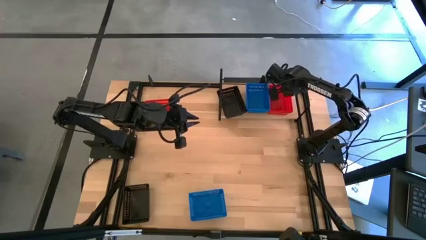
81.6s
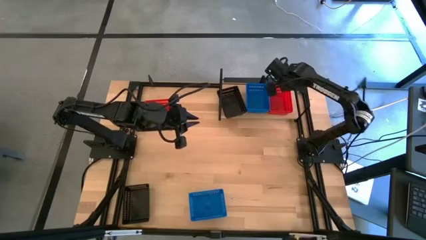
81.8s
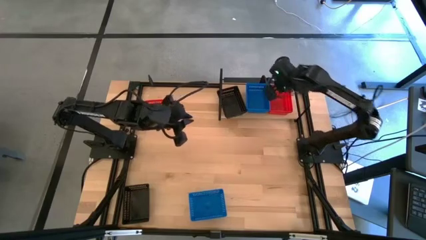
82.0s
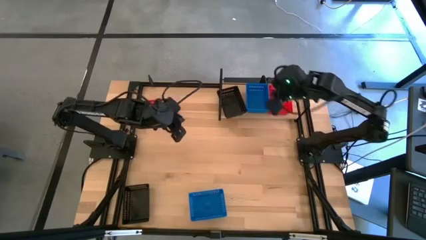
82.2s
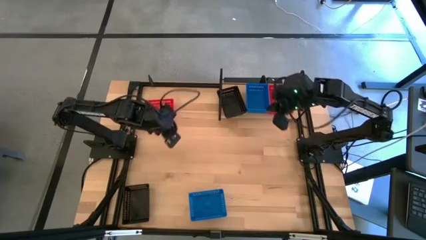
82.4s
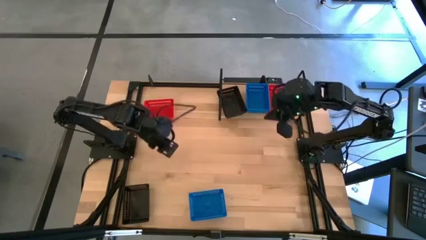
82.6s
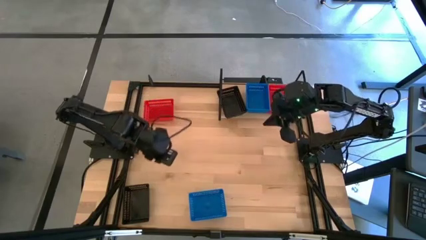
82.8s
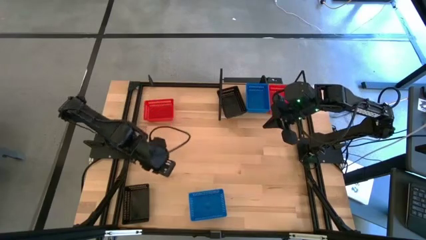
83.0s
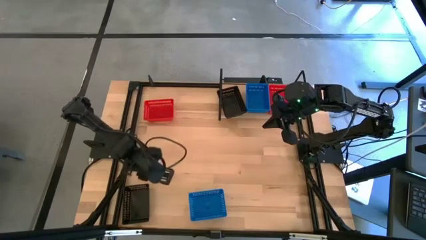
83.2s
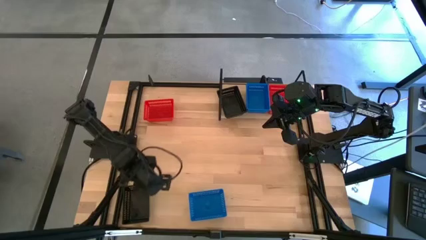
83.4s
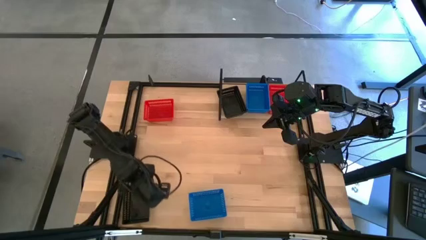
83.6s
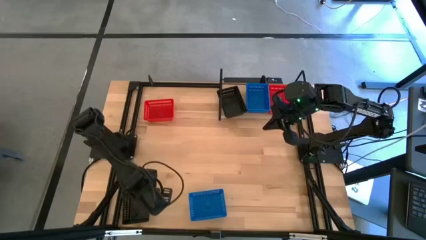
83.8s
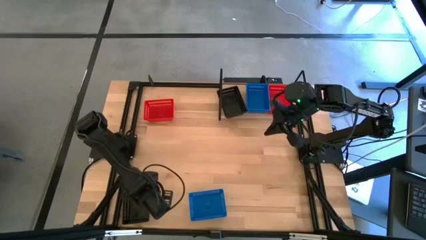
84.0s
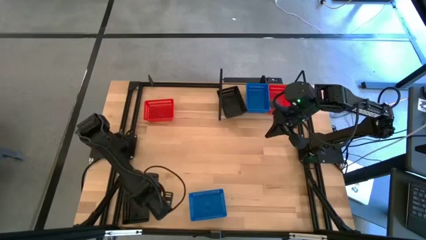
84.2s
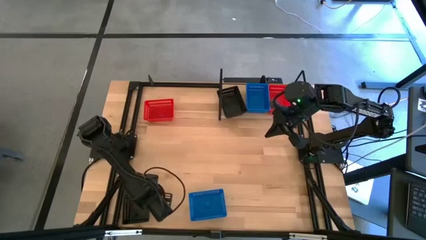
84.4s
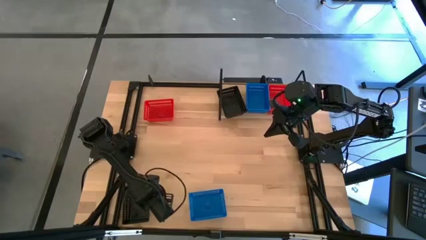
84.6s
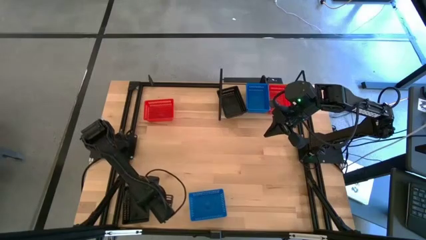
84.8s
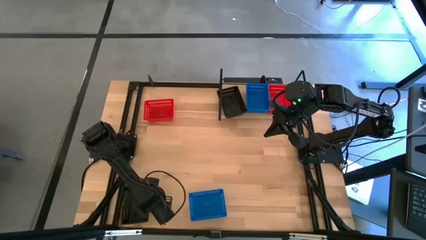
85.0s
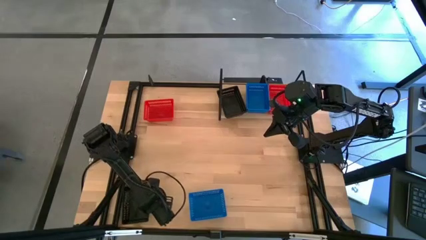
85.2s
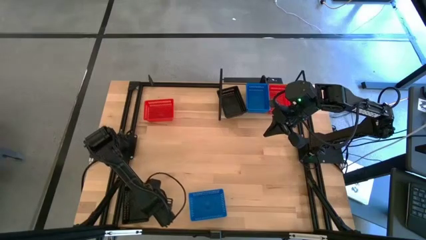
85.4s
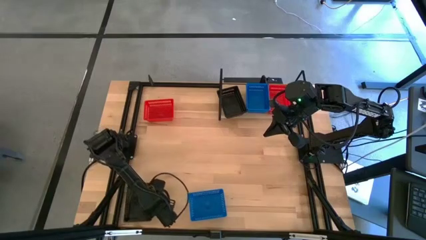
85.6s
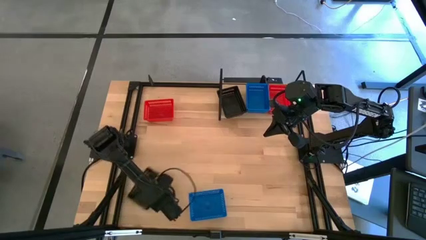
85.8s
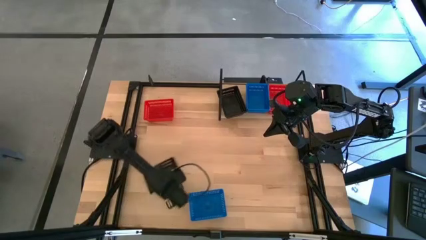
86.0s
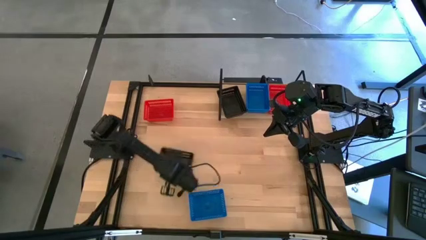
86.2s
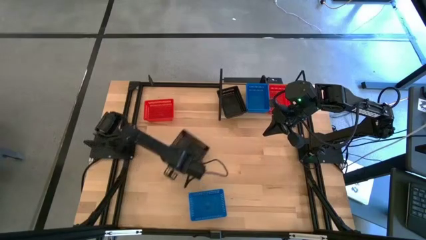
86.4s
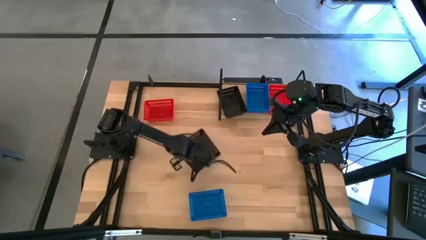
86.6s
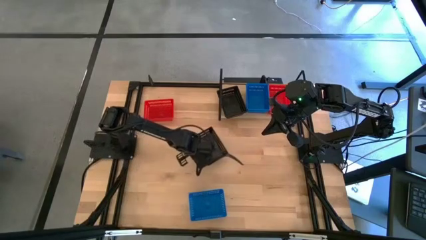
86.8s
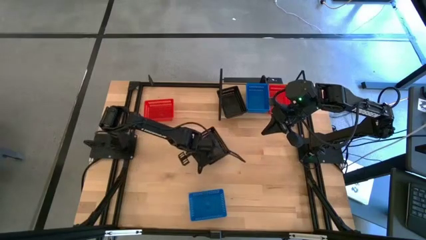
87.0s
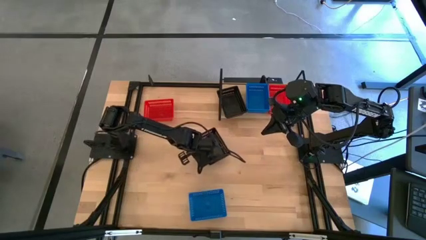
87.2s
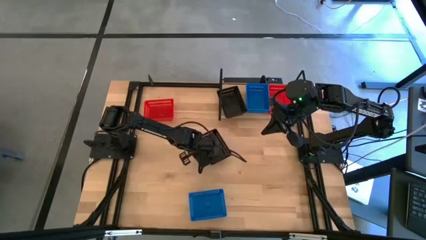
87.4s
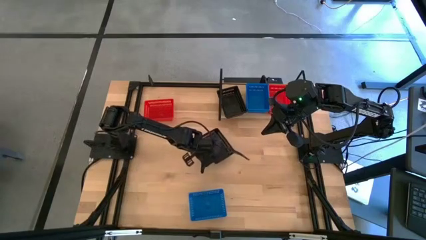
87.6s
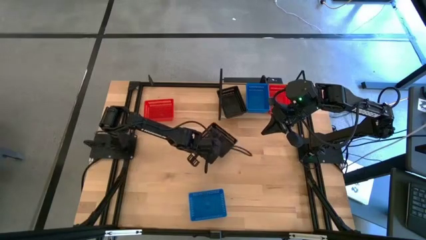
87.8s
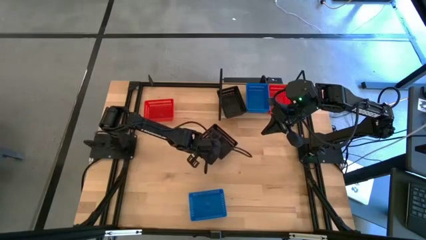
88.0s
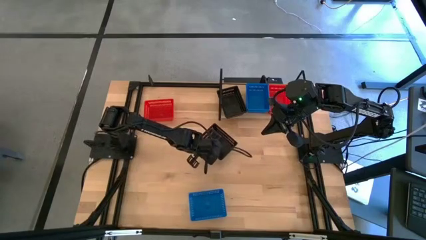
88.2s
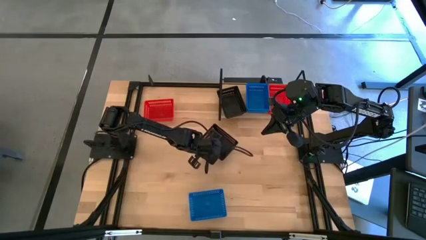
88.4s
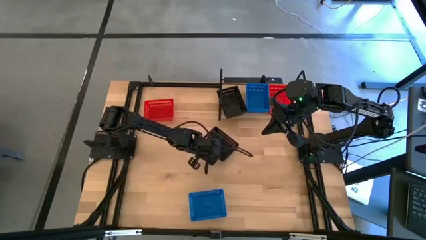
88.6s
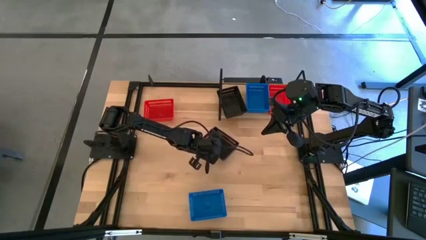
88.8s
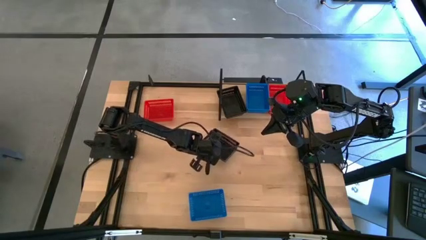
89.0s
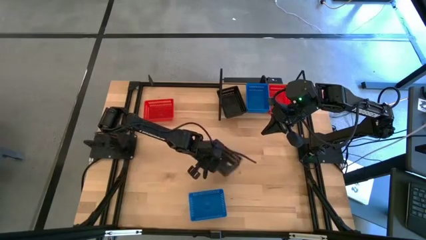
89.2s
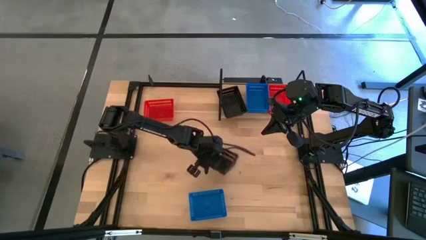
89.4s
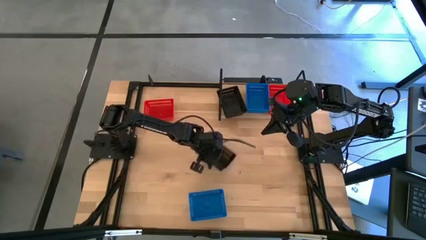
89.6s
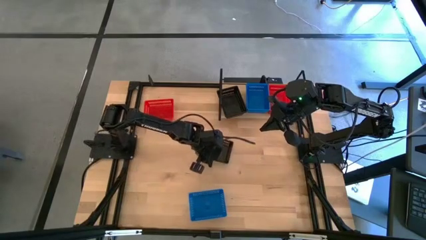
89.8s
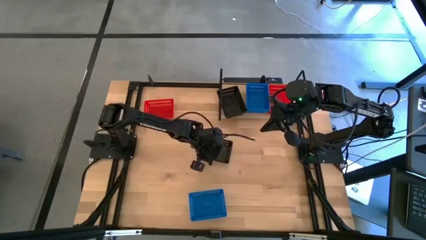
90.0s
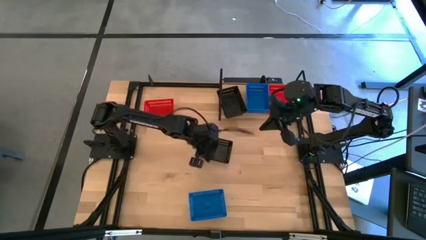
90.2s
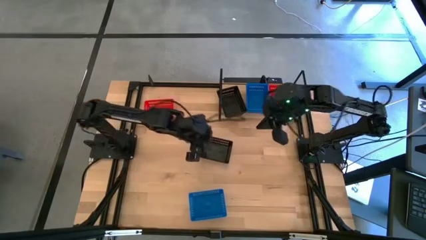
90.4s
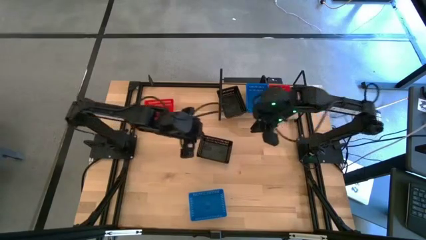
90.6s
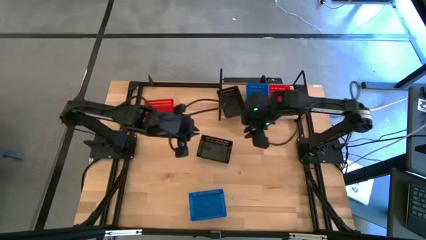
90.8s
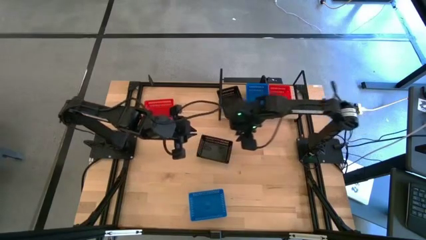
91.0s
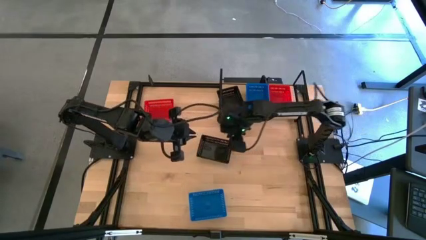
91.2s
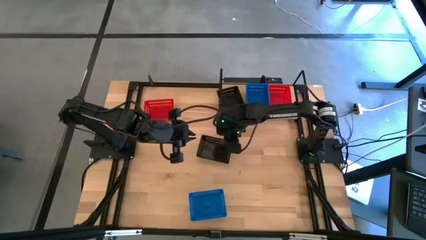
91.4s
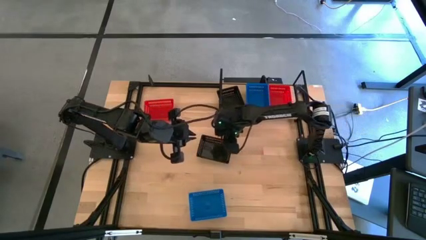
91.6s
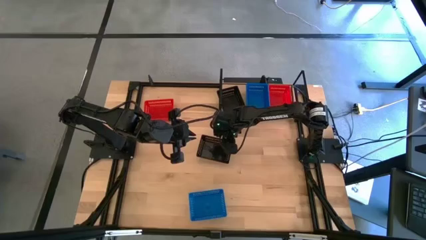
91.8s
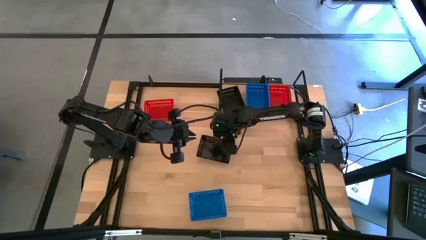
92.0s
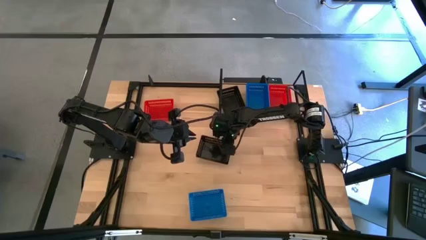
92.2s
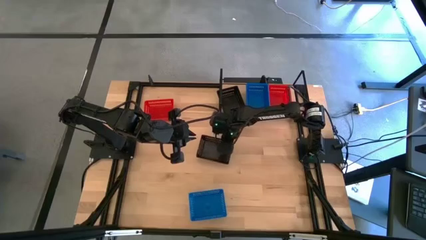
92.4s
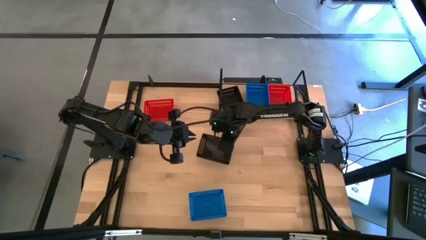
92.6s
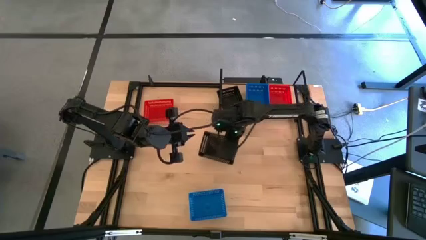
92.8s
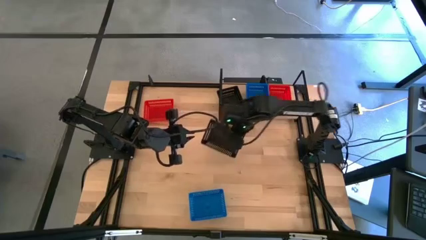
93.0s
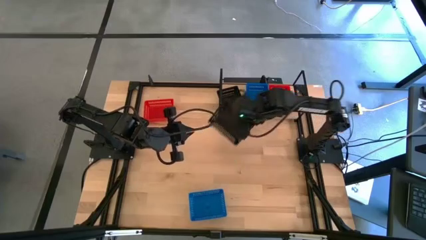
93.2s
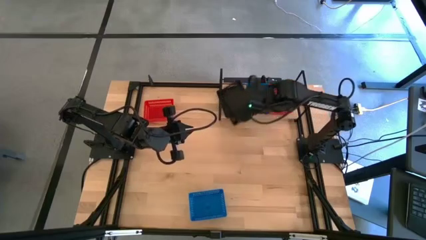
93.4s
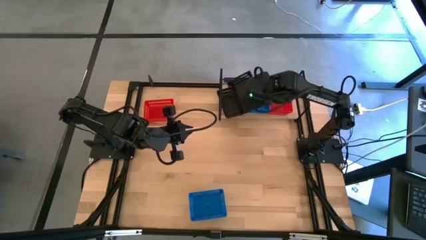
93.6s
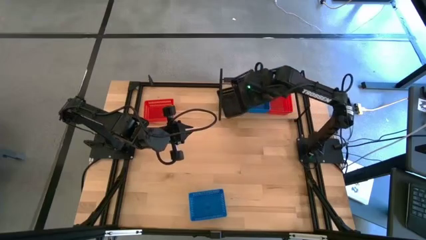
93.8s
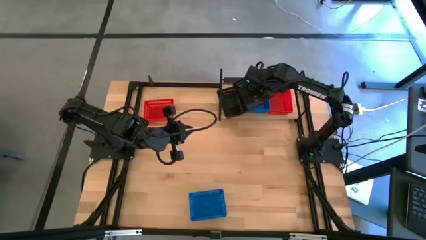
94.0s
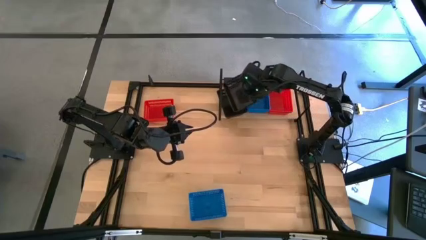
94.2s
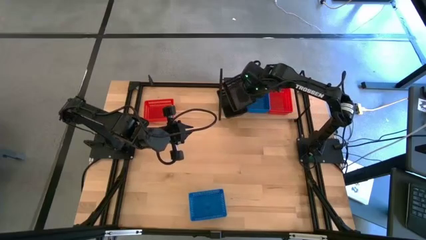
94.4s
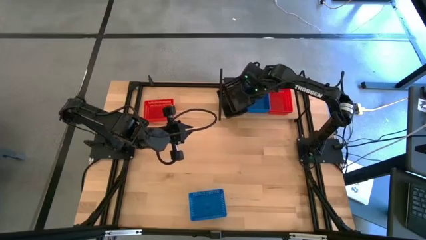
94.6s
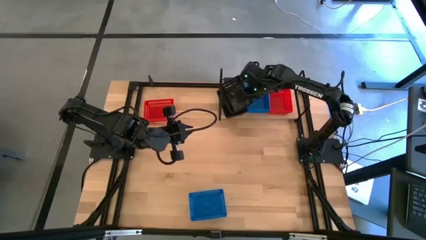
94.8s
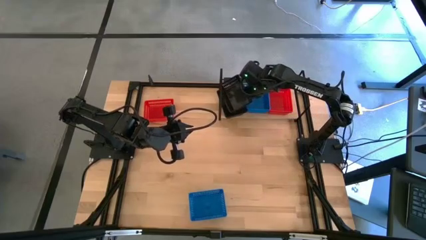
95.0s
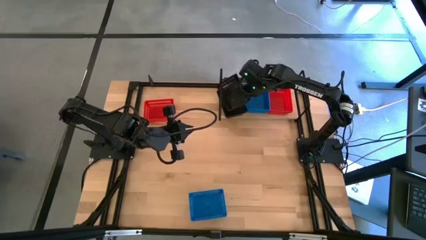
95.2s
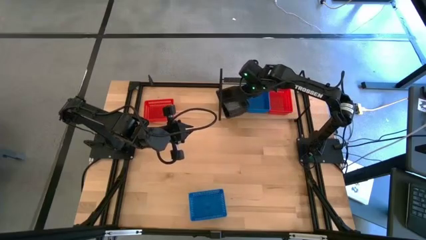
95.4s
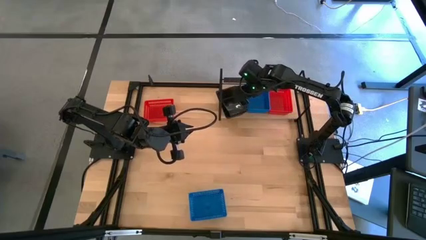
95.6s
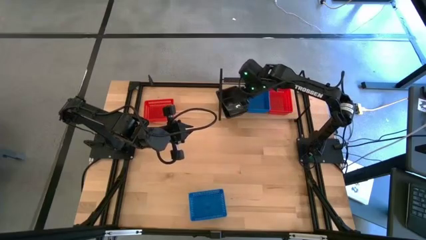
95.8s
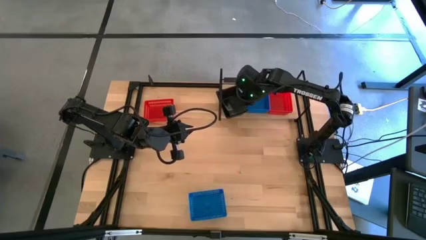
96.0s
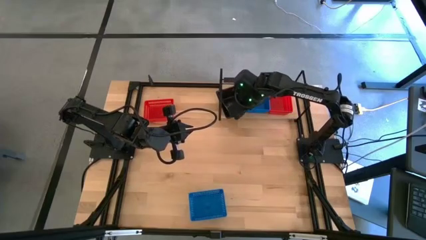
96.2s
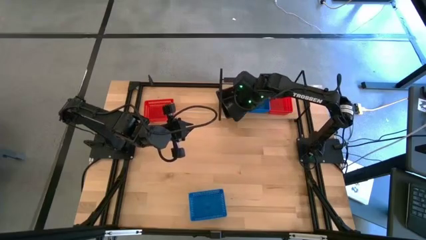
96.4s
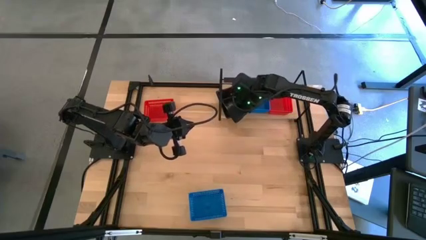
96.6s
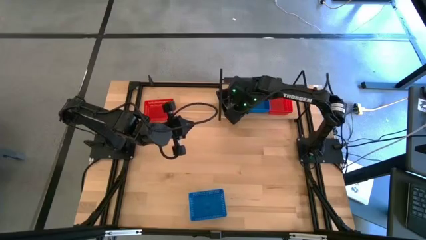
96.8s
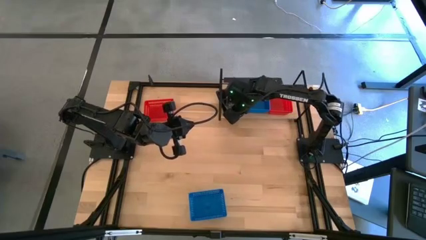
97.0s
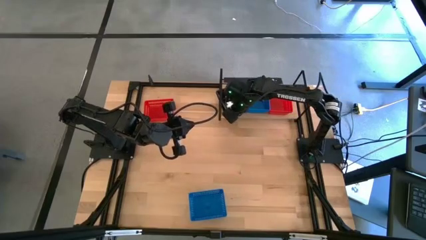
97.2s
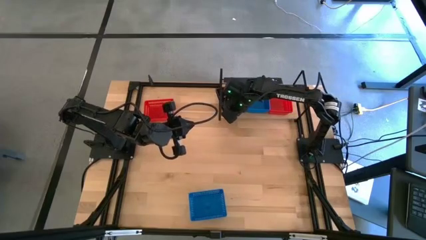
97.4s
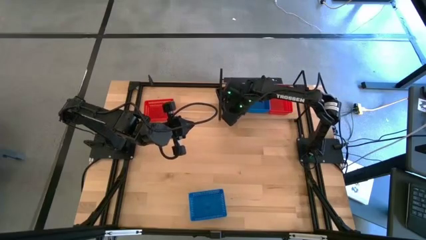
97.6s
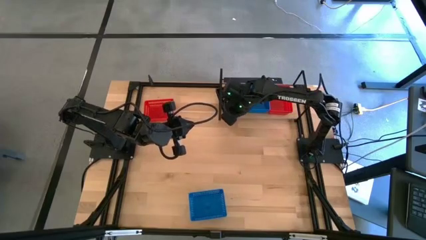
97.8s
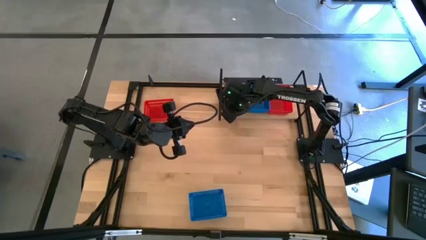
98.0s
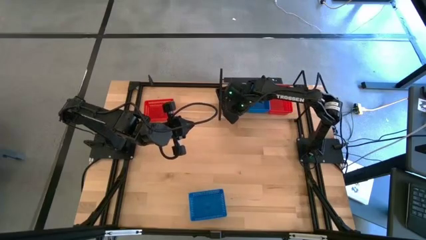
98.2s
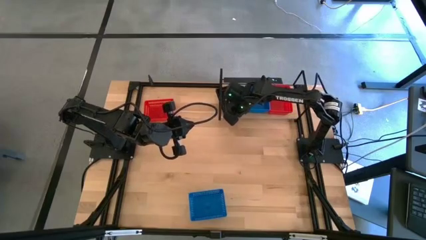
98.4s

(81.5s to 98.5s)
Task: Stack baskets on shelf by color
Stack the black bin on top of the other stacked black bin on the shelf
